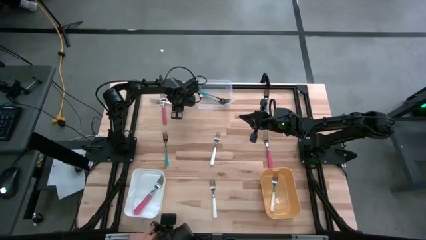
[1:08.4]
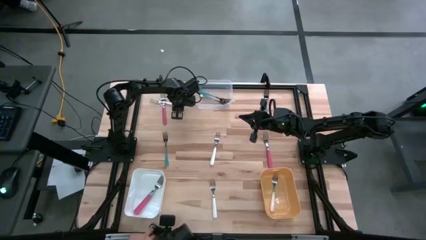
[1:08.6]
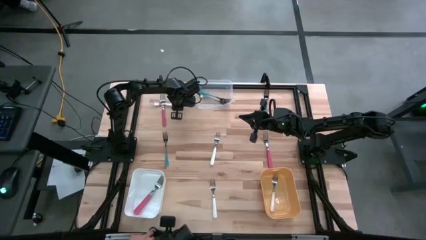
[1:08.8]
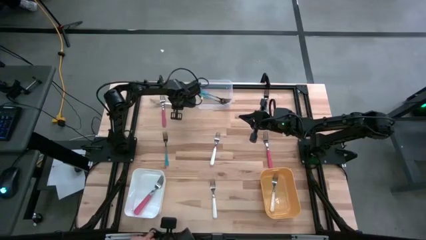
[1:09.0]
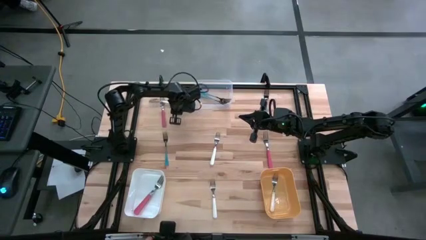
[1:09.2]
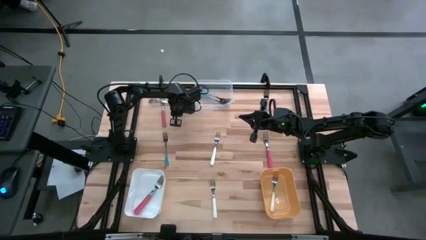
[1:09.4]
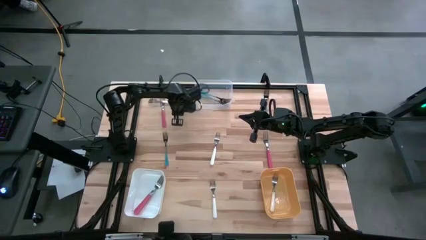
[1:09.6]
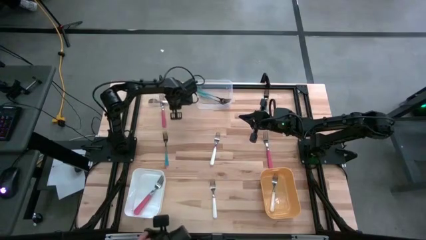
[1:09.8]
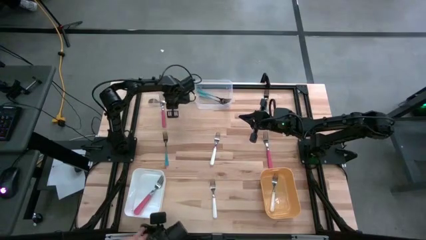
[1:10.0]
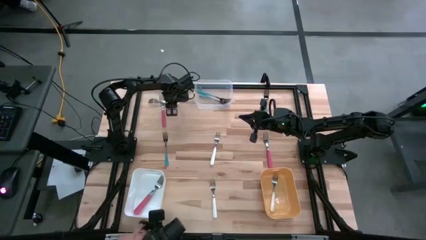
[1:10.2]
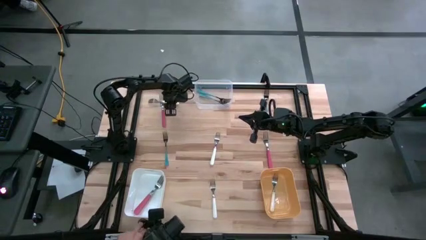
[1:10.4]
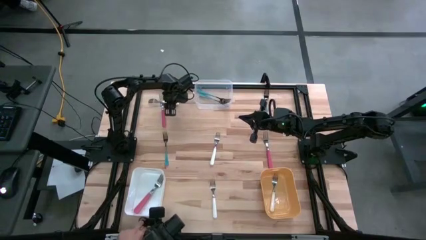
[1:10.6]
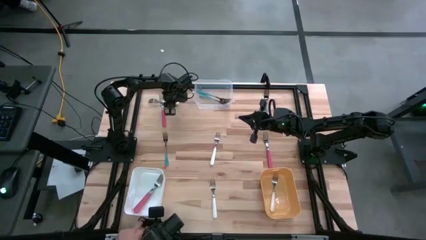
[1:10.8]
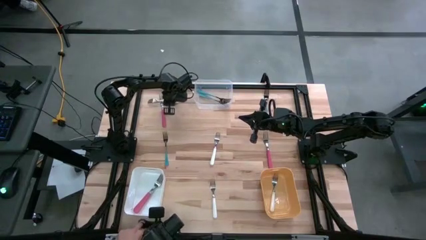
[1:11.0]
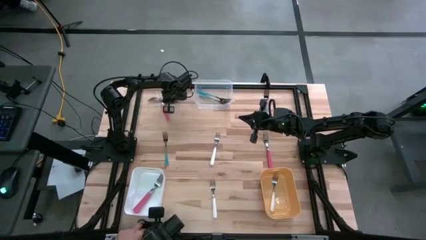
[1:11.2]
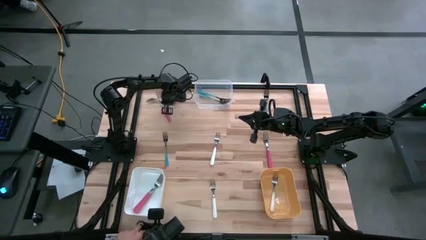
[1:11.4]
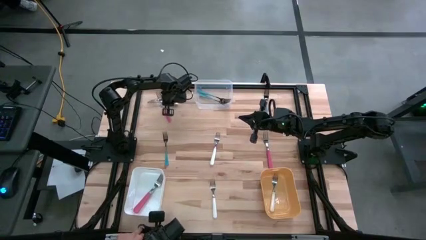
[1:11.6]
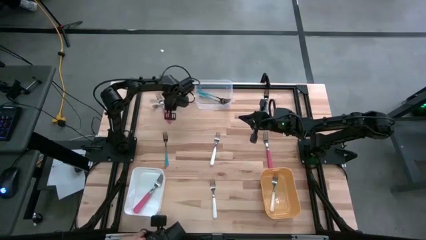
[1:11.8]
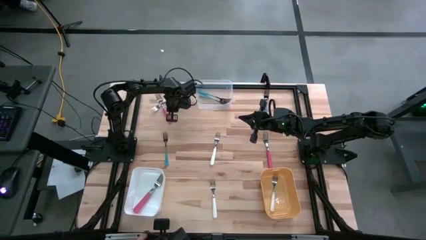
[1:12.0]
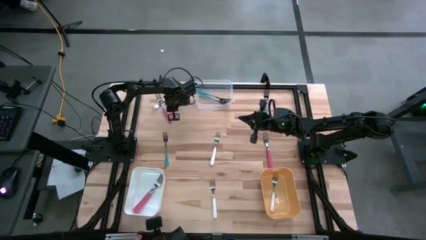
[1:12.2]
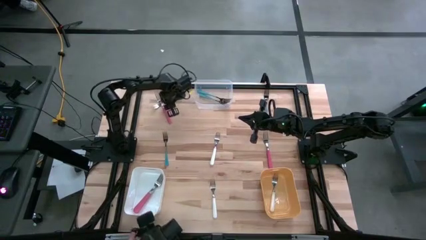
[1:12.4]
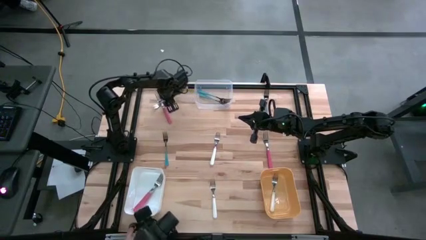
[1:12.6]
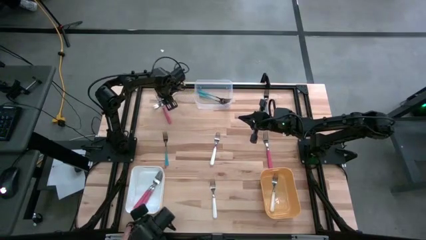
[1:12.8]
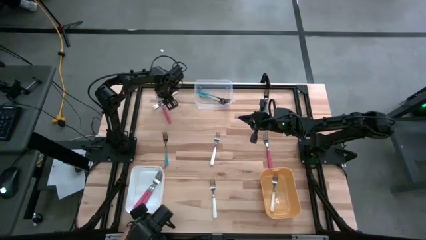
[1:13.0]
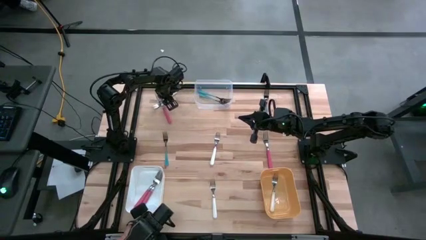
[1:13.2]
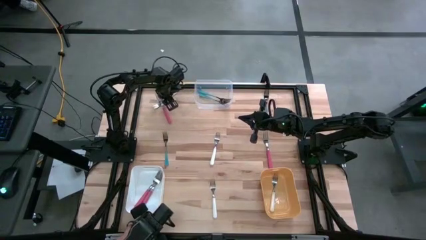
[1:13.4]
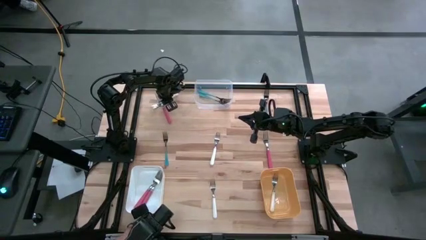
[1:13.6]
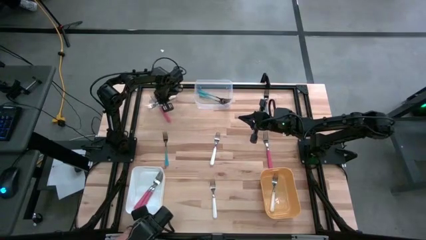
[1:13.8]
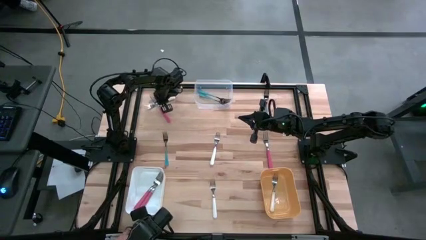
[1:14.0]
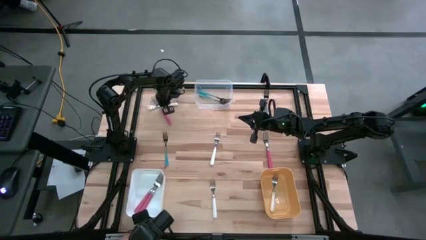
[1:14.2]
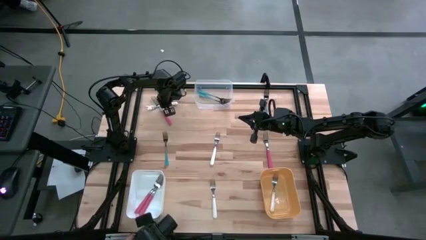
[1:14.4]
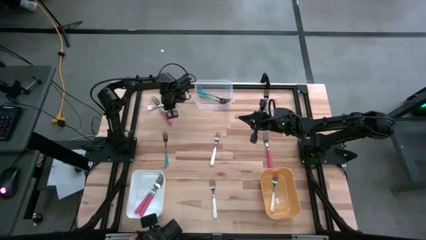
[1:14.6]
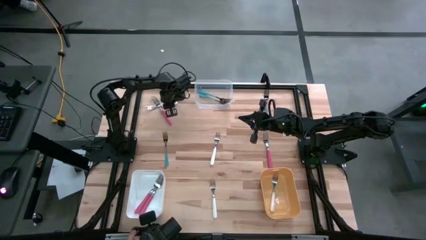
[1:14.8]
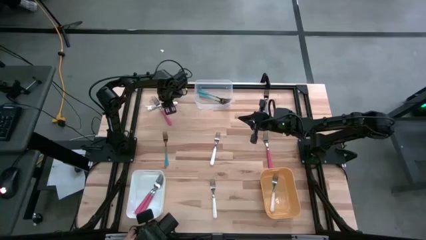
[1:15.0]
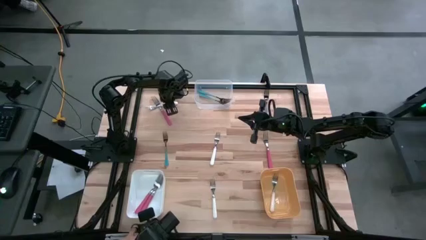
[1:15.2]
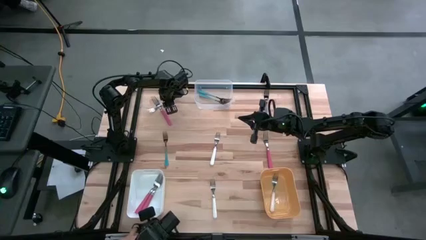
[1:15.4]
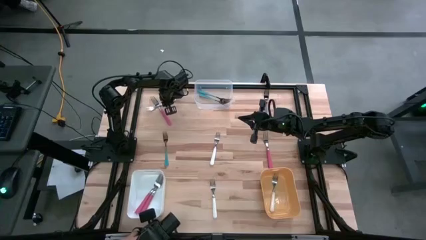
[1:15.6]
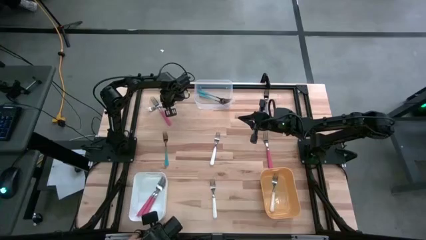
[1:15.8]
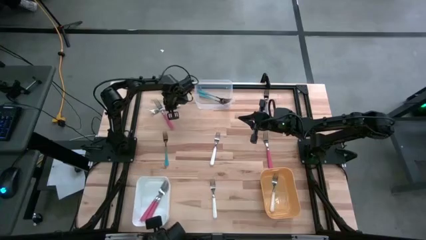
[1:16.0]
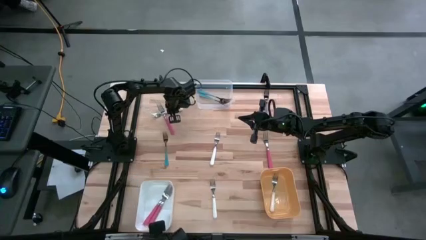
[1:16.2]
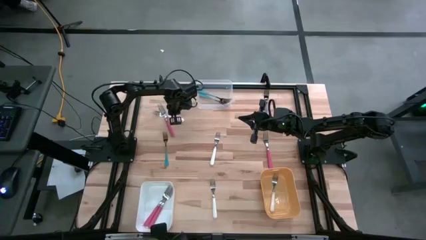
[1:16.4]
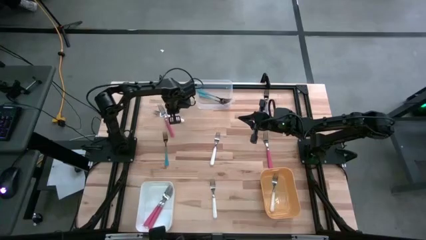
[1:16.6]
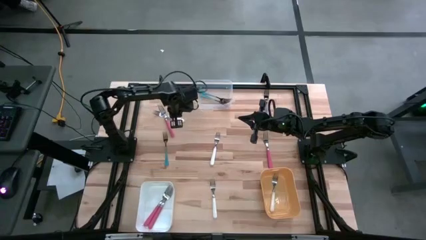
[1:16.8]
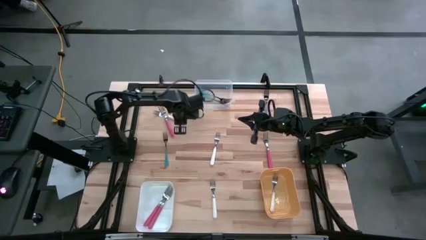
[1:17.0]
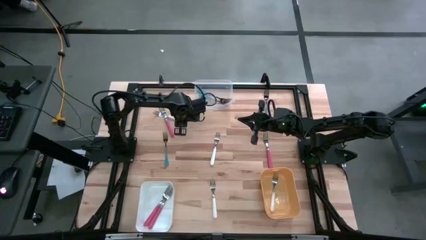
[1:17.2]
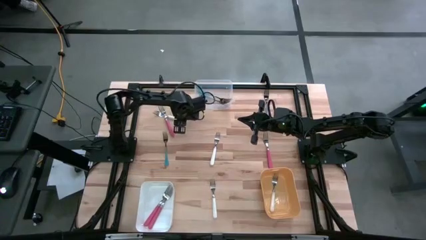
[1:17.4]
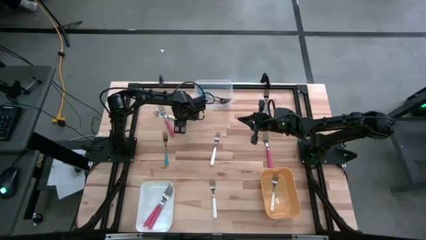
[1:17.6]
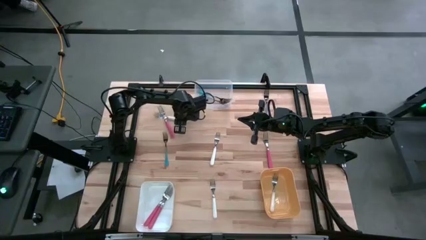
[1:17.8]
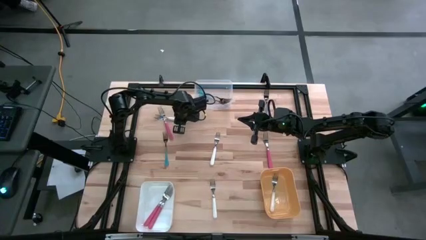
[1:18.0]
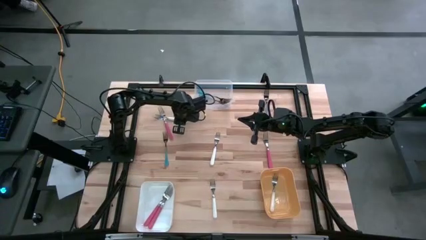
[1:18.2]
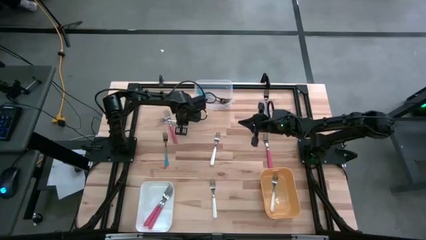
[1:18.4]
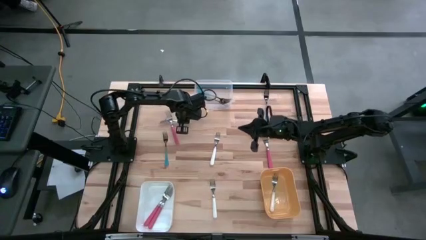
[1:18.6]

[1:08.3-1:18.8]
Task: Sort silverware by color (type)
Put the white fork into the yellow bin

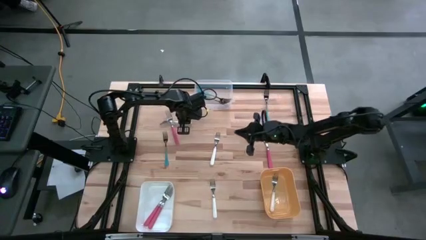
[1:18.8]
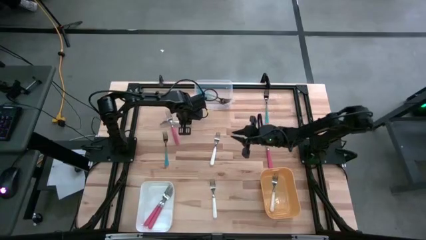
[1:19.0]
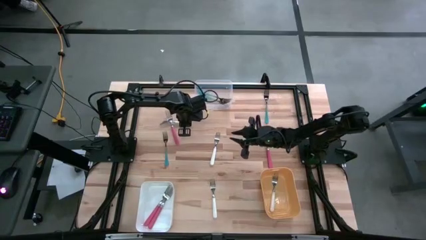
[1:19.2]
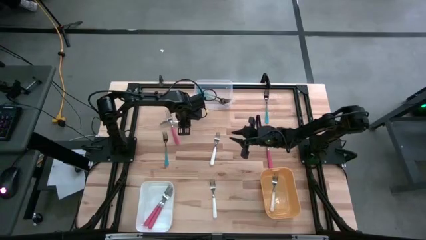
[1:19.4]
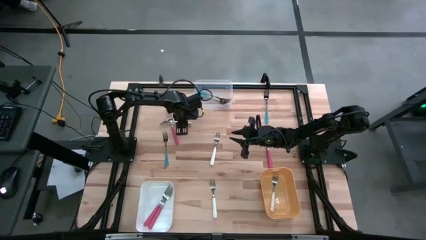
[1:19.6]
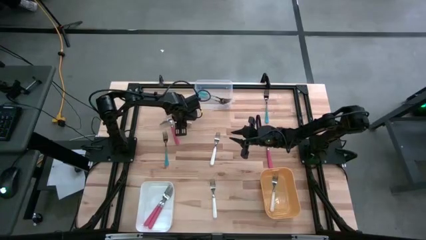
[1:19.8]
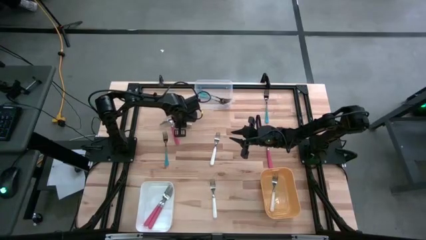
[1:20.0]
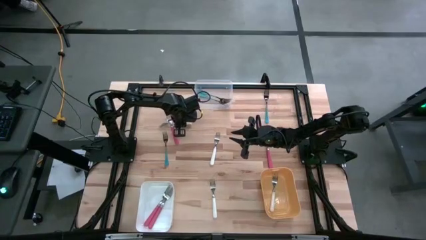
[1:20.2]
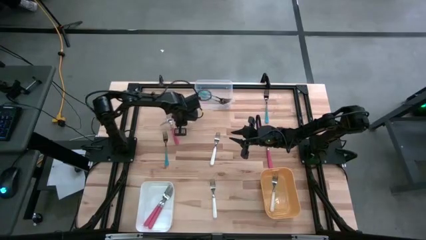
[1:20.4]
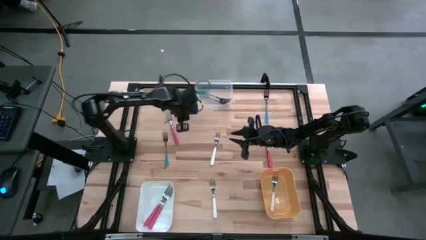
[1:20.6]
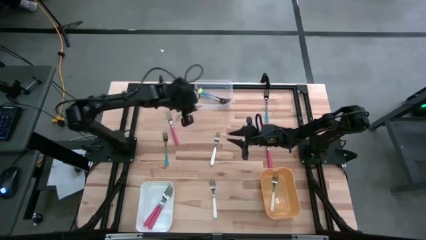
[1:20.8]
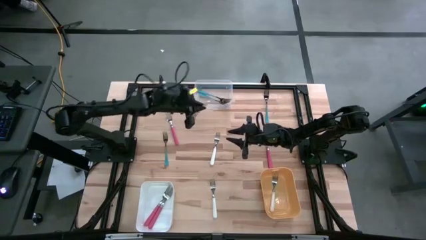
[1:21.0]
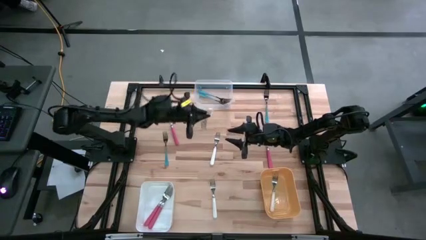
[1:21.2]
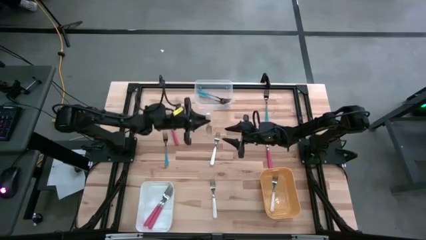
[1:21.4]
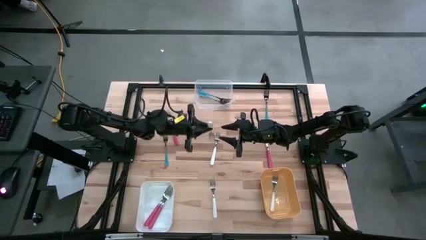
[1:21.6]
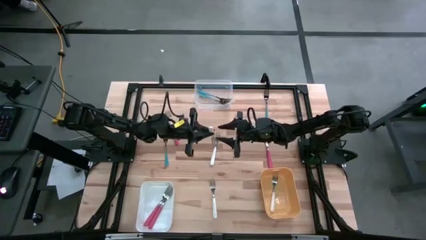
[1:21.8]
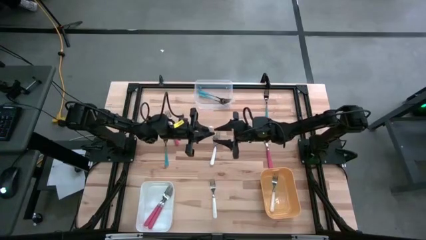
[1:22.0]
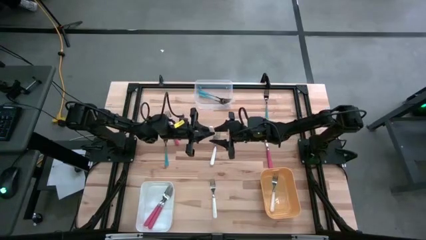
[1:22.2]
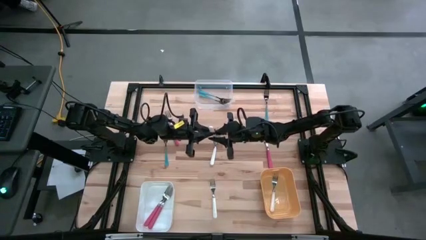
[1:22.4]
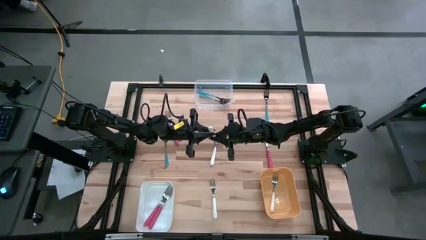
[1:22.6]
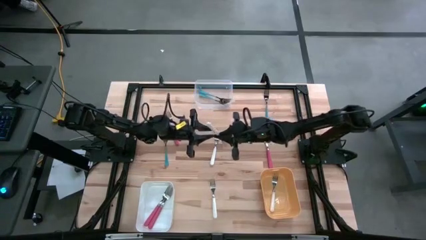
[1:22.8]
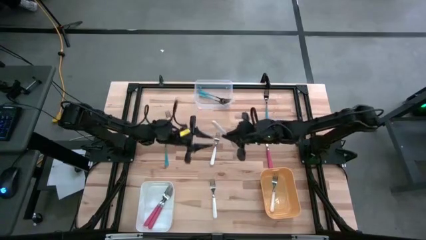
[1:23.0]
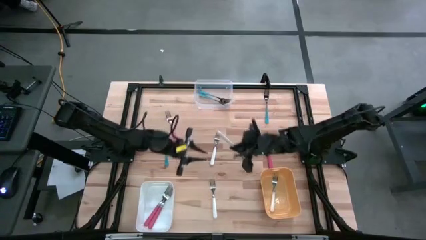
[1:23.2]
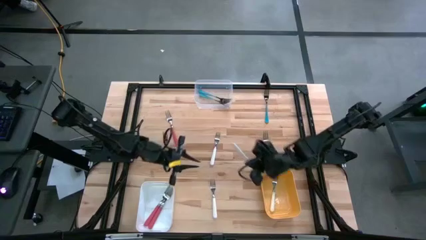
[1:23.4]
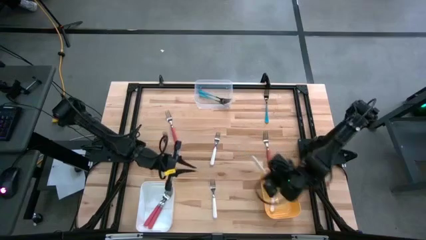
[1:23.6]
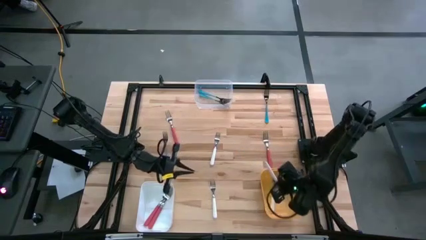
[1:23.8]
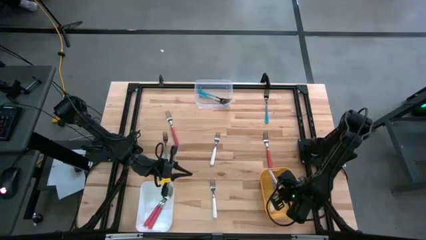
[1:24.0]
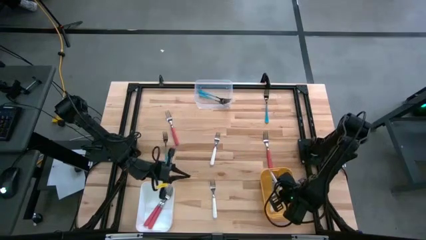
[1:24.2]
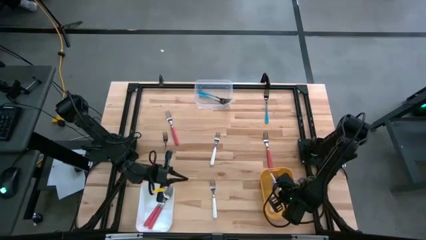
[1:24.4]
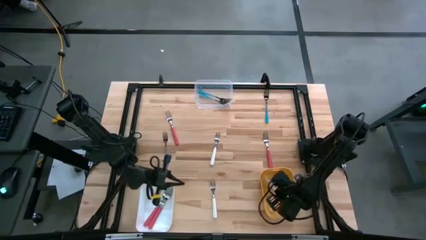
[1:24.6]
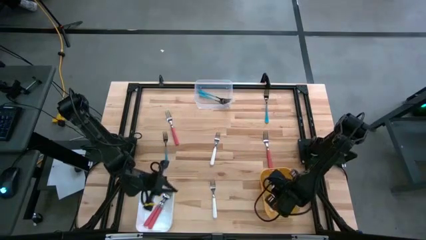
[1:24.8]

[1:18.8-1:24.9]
Put the white fork into the yellow bin

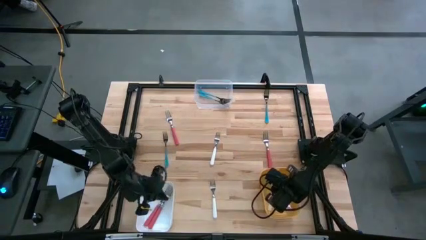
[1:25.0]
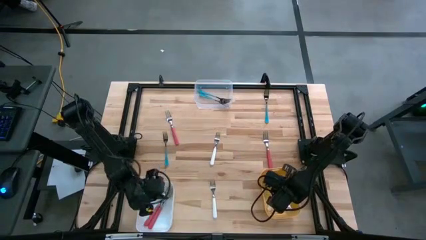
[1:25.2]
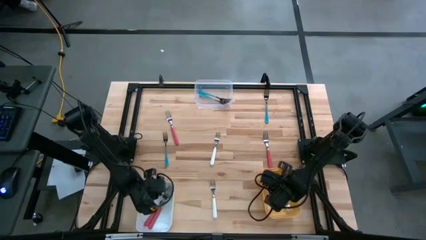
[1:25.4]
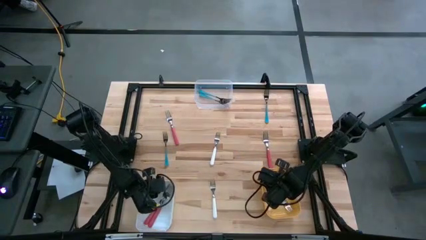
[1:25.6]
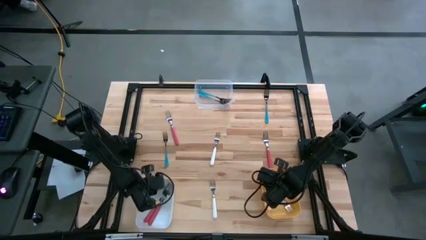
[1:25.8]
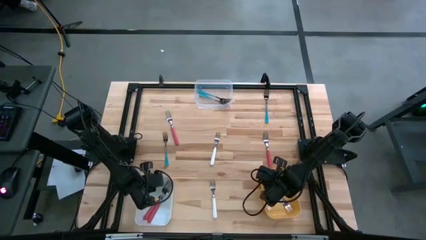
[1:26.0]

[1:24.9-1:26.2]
Adjust the white bin

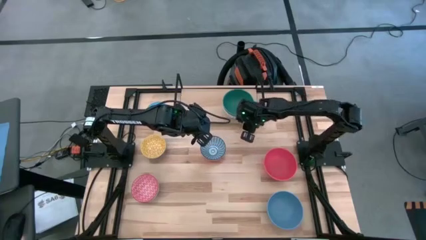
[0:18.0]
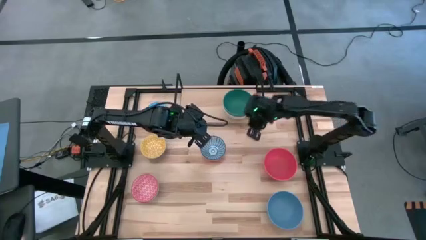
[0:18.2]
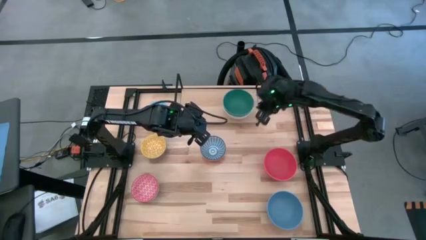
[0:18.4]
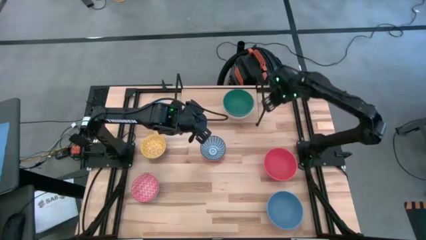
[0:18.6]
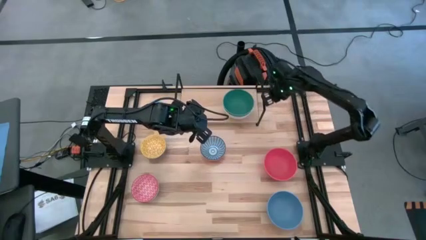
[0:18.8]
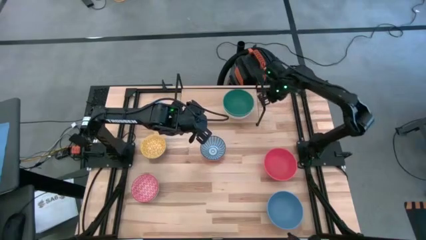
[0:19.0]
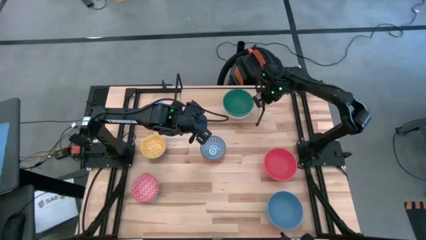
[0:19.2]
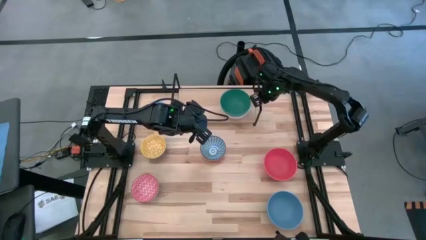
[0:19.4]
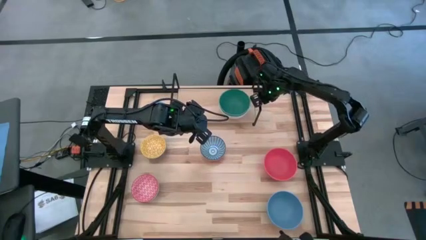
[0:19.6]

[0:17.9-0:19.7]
Task: Place and stack bowls onto a shelf
Adjust the shelf on the table
